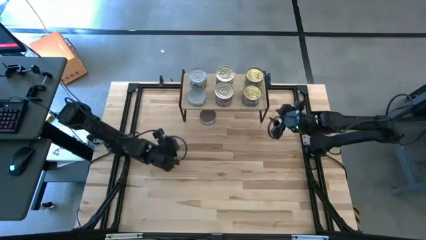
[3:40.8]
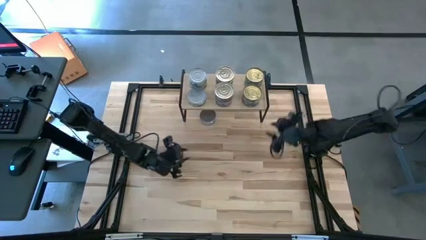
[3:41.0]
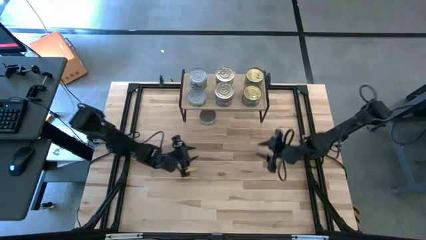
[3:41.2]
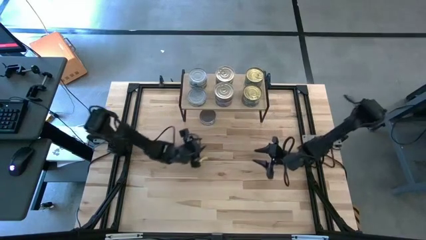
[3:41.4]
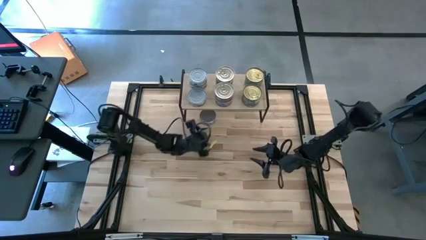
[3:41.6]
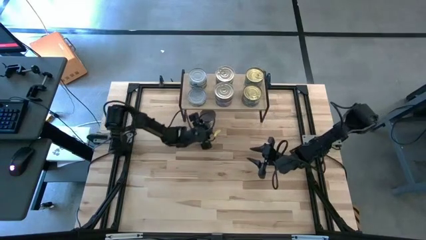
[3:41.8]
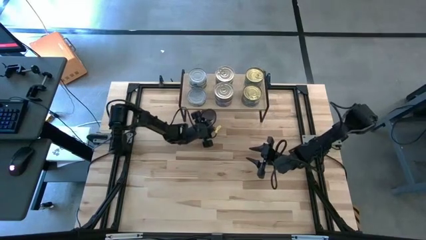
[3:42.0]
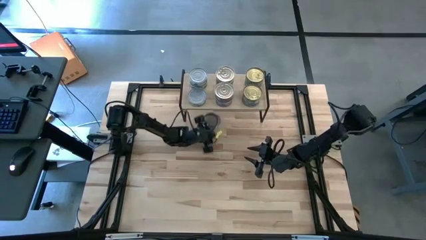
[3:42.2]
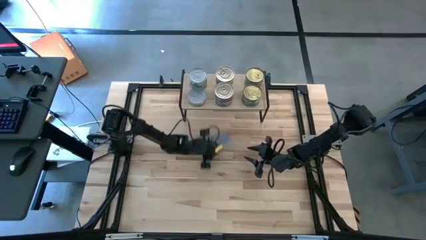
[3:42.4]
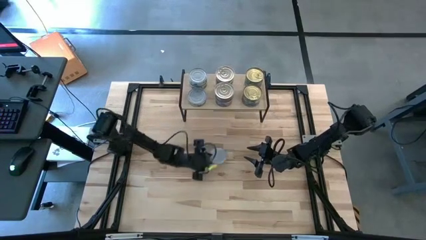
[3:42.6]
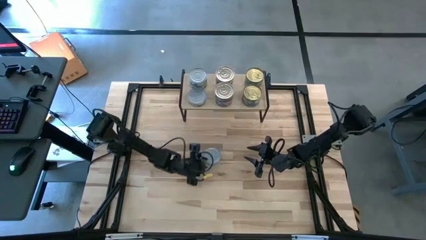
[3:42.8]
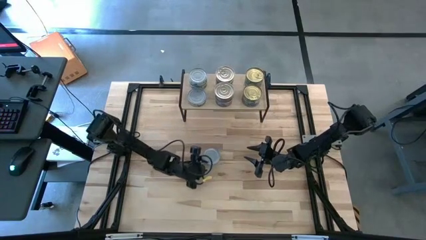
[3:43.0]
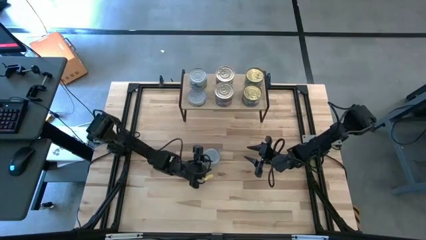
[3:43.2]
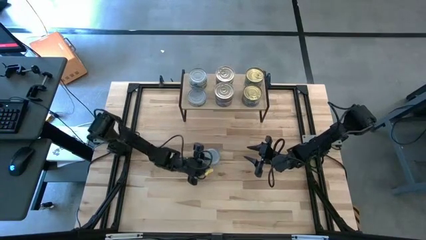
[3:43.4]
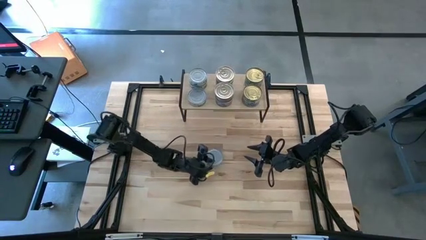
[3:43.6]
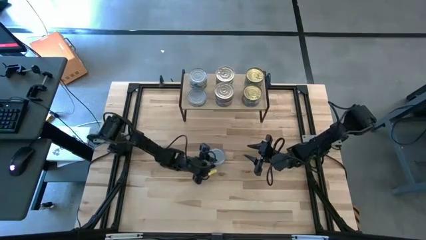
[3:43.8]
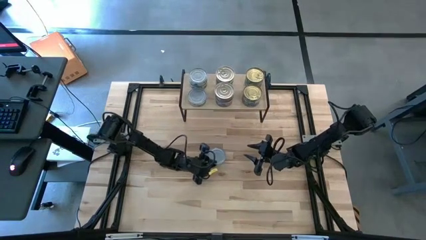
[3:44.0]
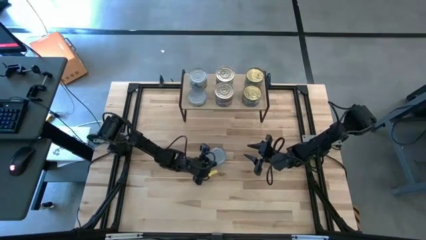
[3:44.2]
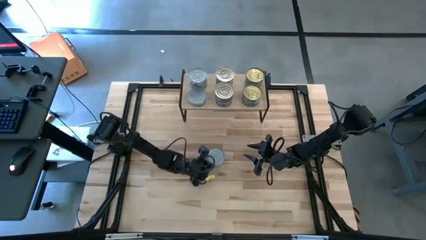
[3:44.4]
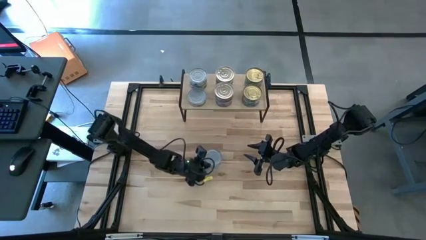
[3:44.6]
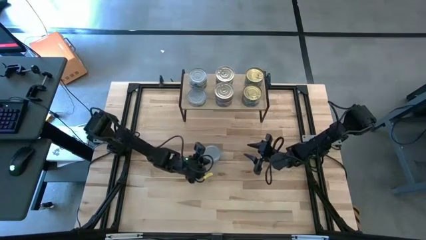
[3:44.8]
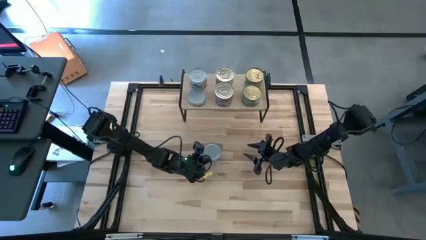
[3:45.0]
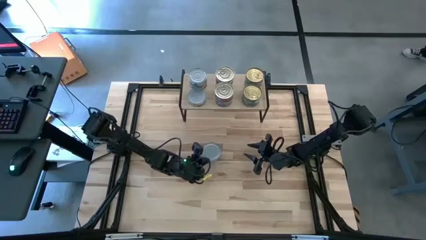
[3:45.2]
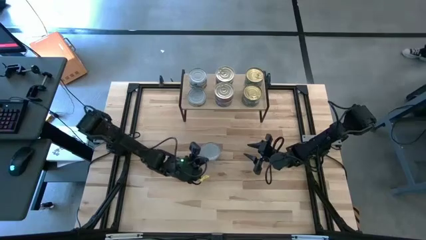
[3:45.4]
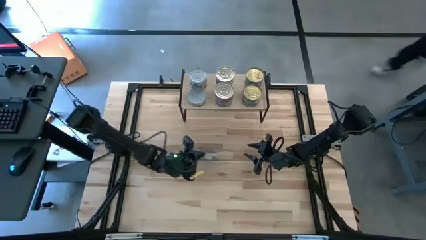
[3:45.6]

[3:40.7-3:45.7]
Task: Stack canned seafood by type on shelf
Stack the green white tuna can on top of the other green white tuna can on the shelf

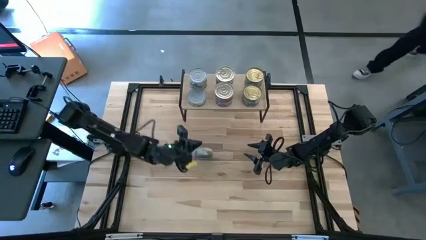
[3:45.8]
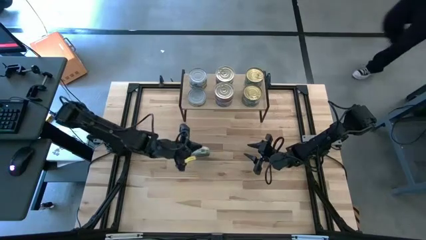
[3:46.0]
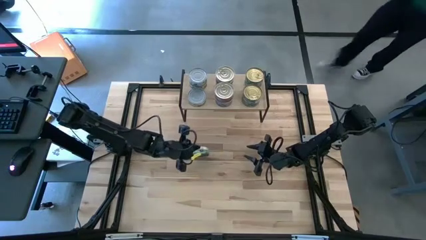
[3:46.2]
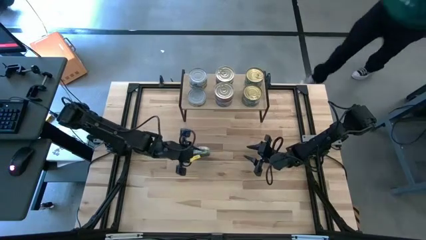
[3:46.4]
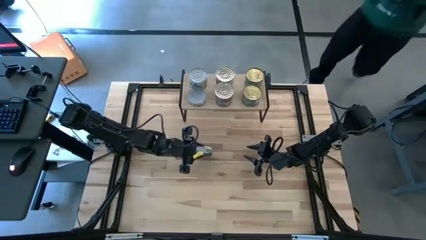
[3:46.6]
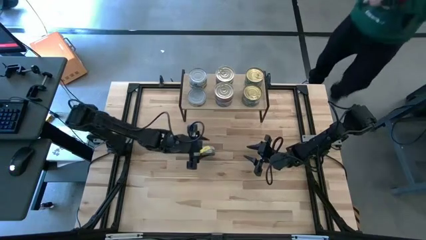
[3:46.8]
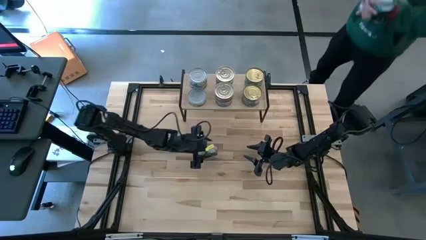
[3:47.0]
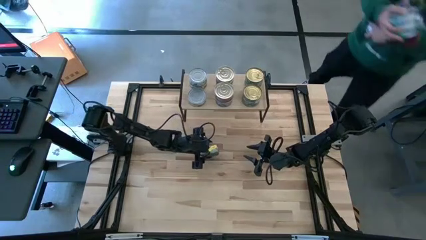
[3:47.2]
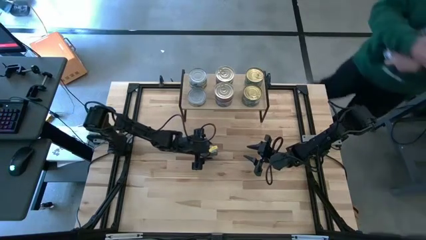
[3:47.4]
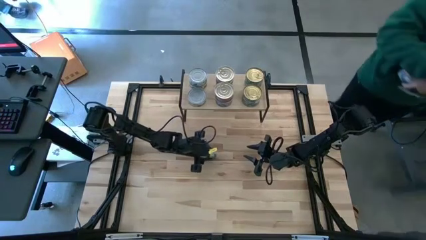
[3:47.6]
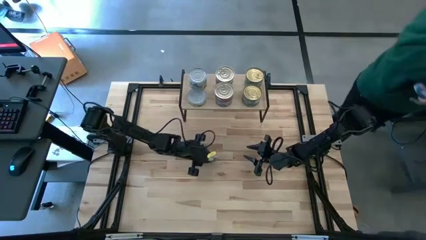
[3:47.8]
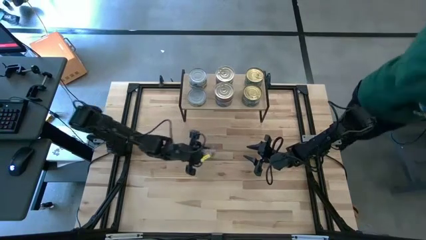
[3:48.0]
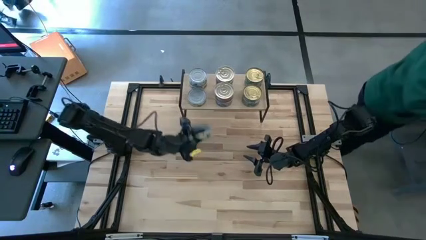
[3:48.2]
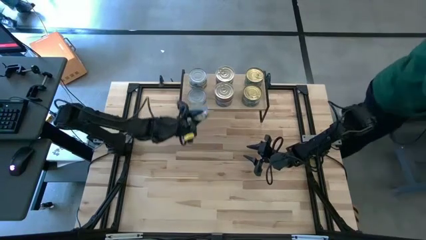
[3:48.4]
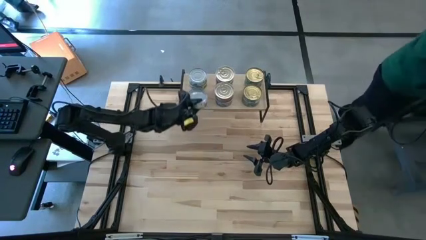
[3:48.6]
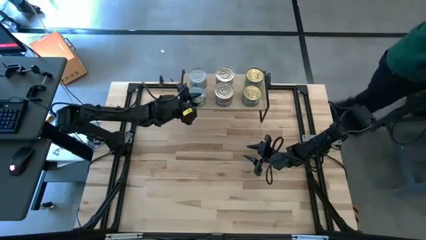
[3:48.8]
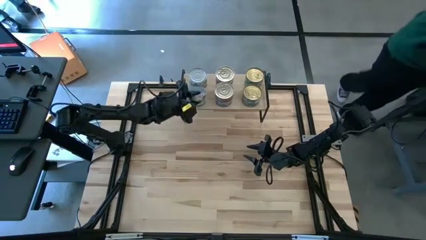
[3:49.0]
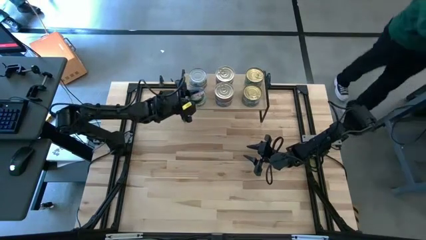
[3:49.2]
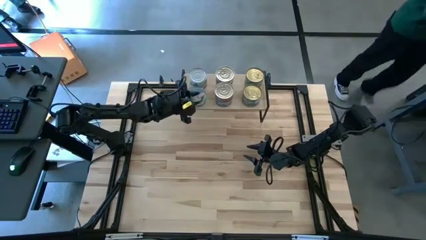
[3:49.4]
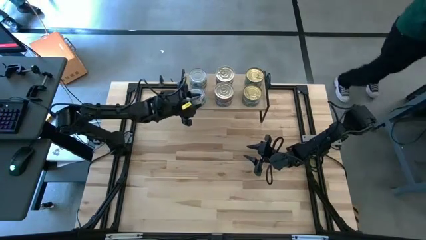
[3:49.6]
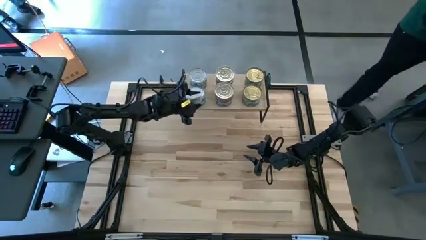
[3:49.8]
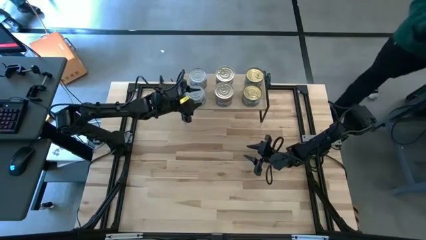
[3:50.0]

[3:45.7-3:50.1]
Stack the green white tuna can on top of the other green white tuna can on the shelf

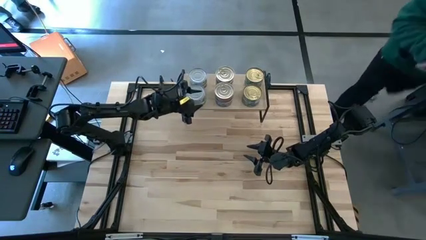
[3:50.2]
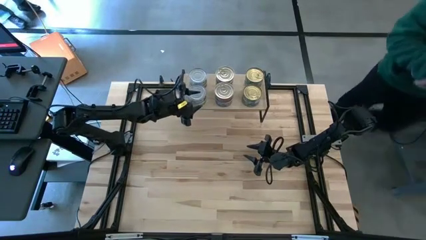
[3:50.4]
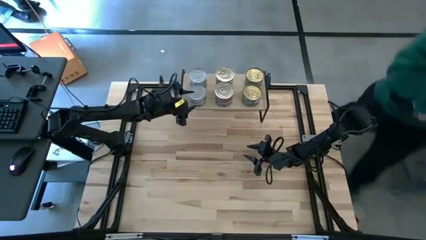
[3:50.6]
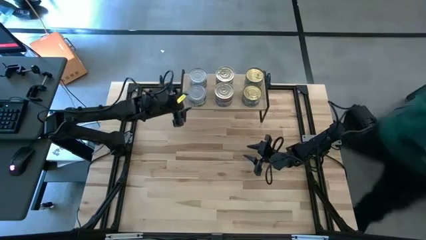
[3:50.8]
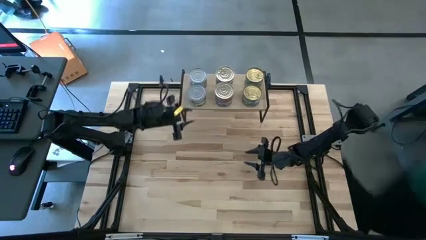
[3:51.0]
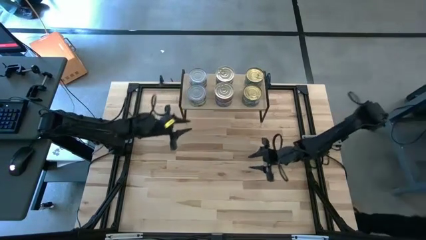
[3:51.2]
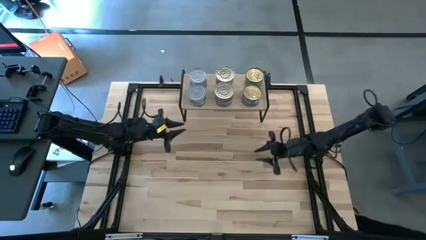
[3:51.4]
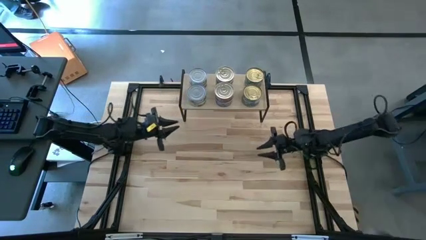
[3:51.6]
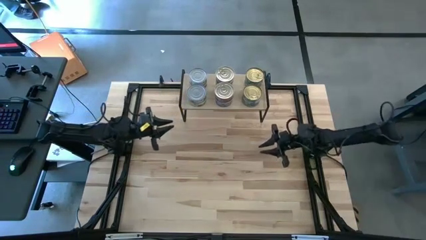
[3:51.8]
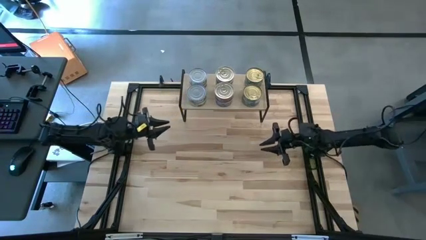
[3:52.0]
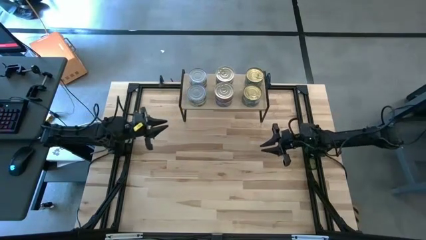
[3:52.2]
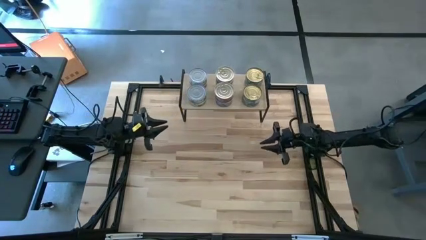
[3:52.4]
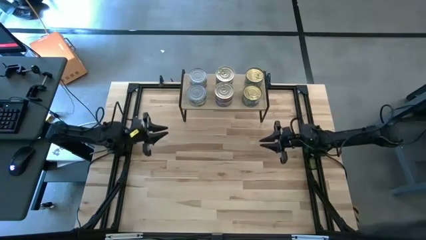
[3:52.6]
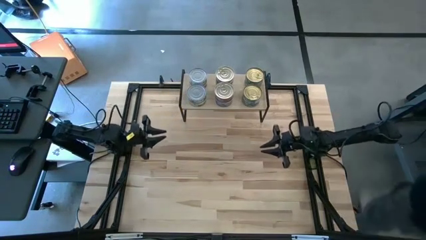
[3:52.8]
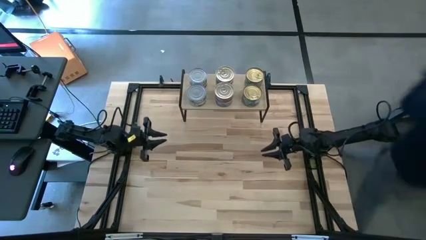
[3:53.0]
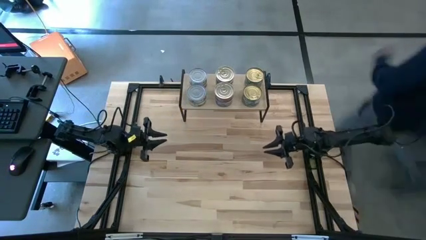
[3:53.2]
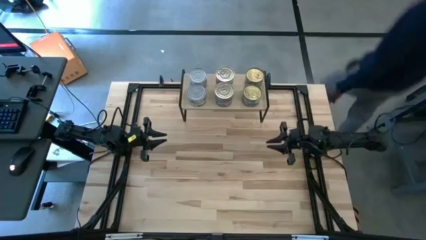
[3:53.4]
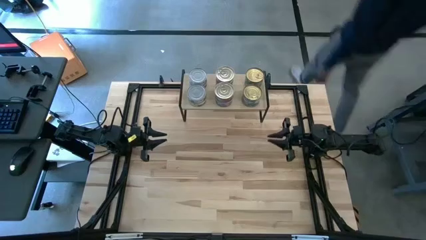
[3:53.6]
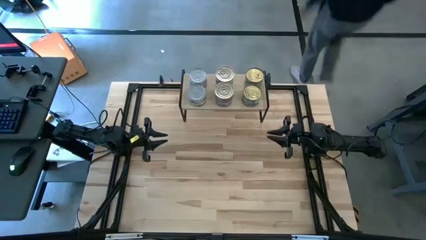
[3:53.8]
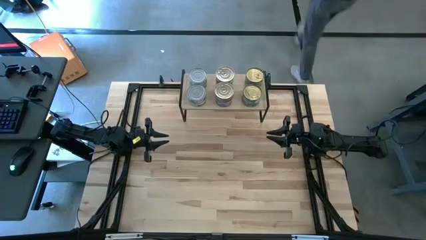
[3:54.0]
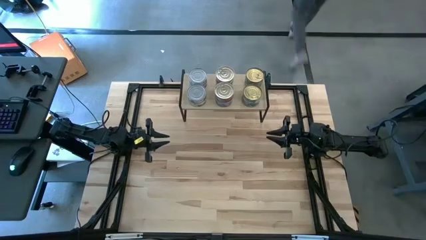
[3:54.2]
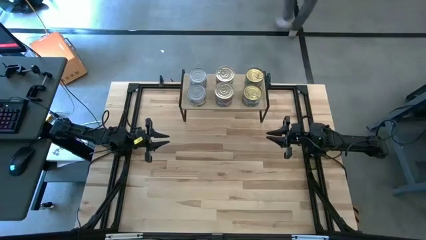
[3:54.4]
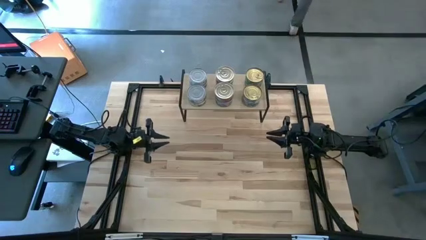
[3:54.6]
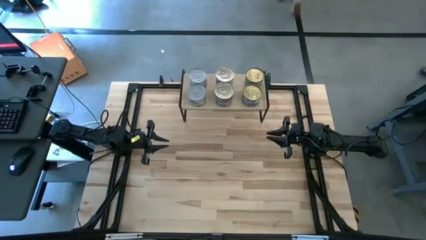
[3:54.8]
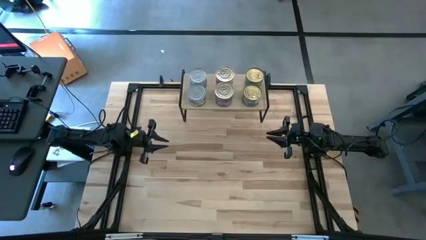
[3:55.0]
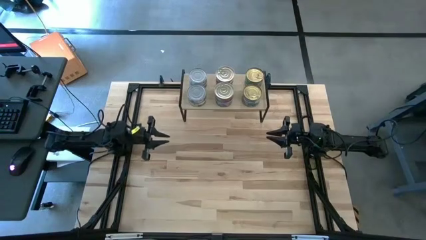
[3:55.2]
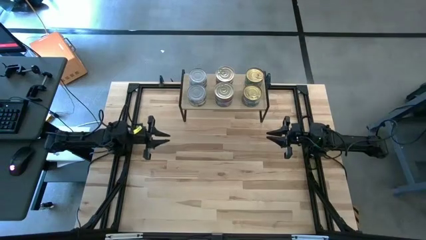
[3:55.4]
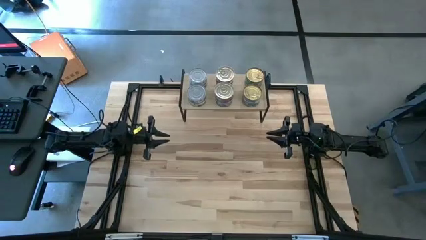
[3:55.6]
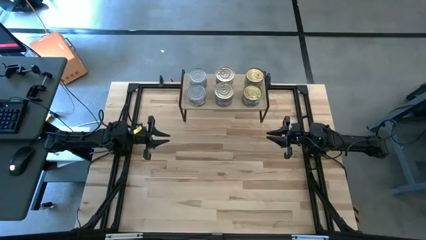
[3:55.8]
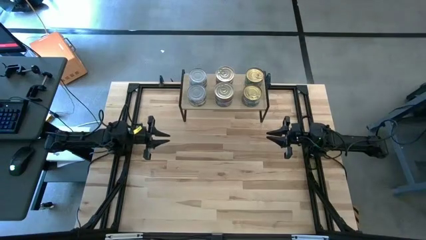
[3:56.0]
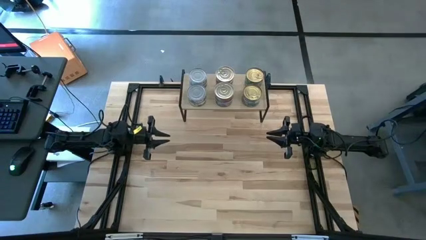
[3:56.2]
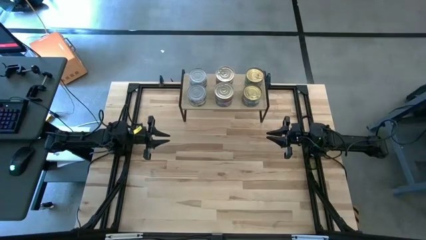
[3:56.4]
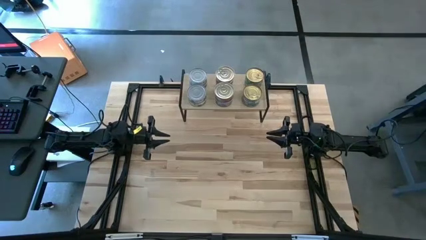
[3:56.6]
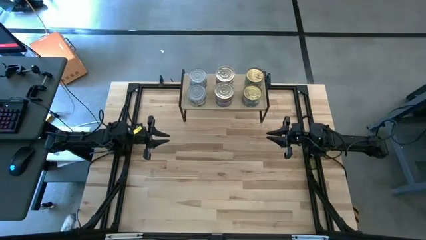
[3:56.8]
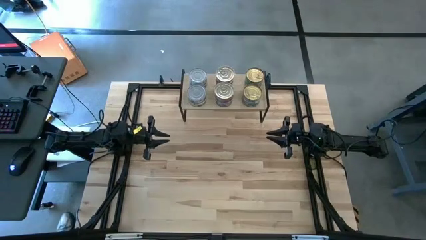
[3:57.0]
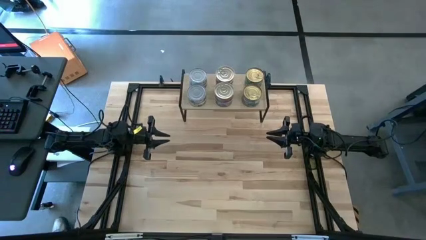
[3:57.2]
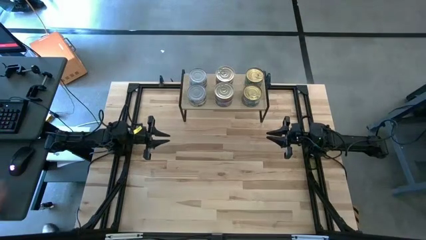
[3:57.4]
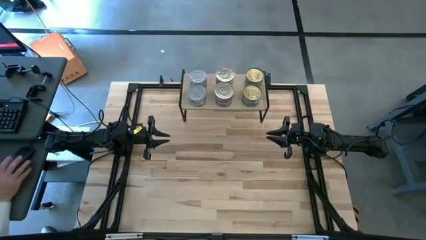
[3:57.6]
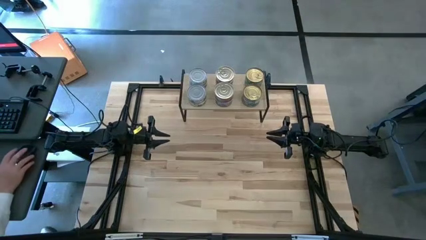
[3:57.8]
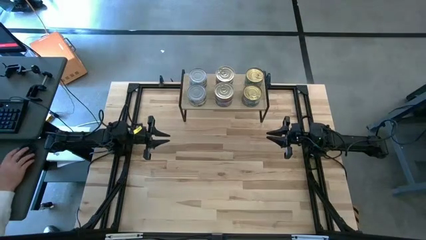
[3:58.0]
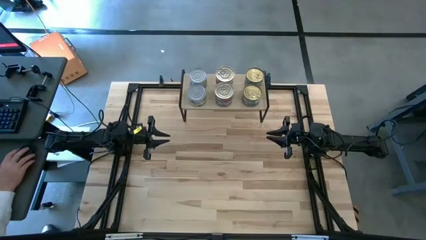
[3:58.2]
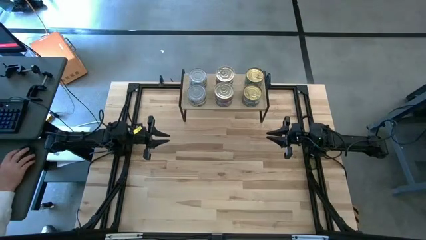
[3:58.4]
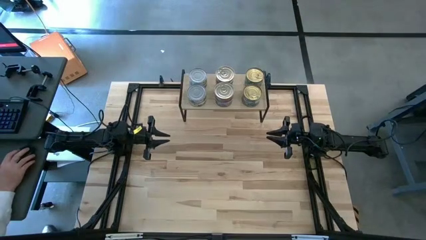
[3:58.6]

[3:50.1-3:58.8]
Return to Home Position
